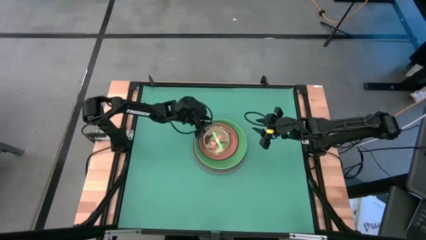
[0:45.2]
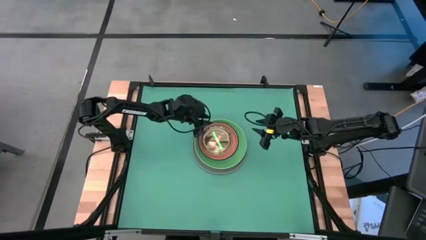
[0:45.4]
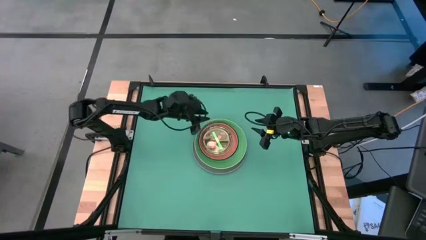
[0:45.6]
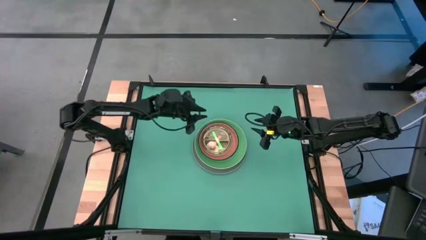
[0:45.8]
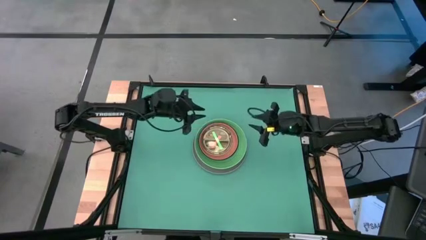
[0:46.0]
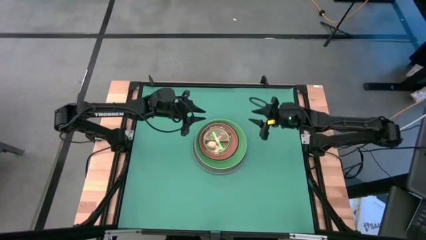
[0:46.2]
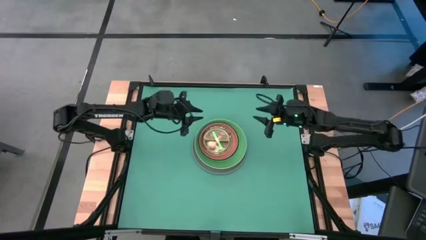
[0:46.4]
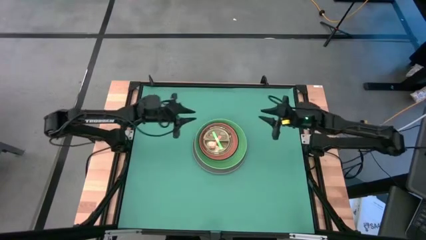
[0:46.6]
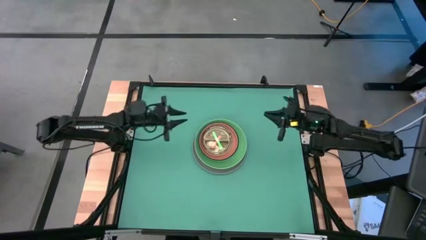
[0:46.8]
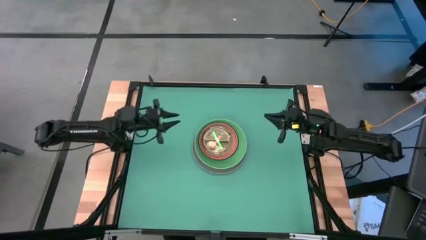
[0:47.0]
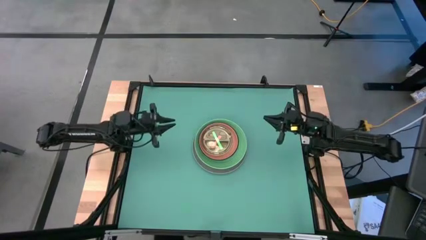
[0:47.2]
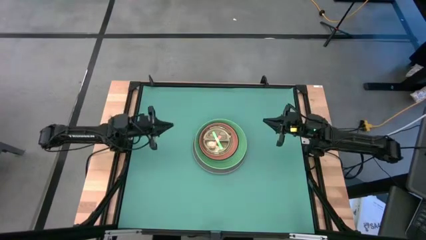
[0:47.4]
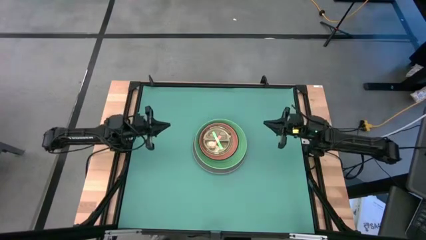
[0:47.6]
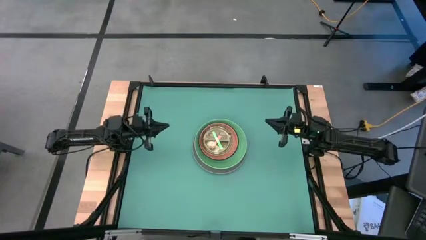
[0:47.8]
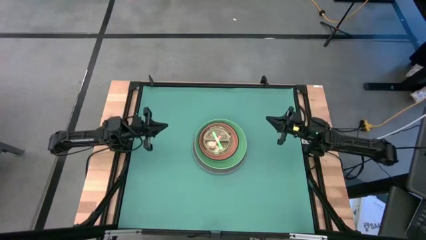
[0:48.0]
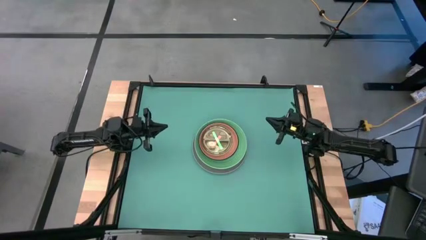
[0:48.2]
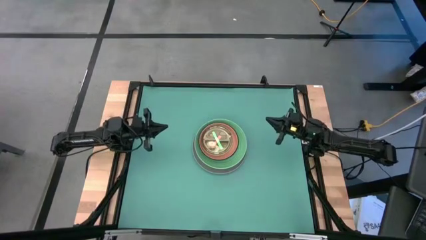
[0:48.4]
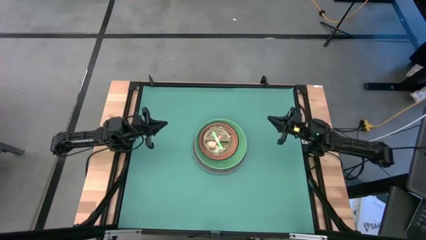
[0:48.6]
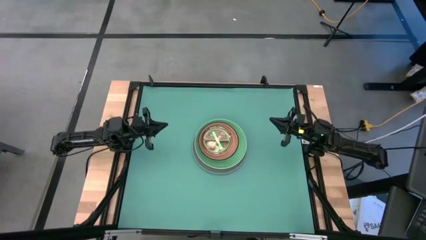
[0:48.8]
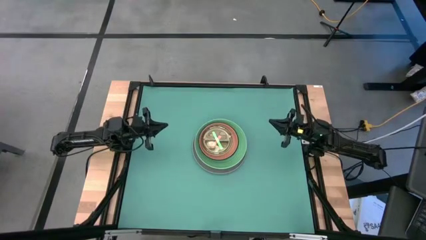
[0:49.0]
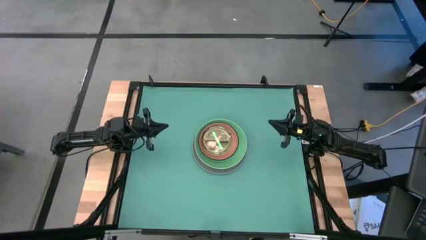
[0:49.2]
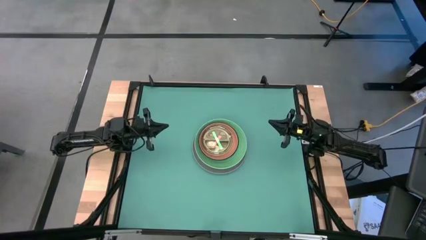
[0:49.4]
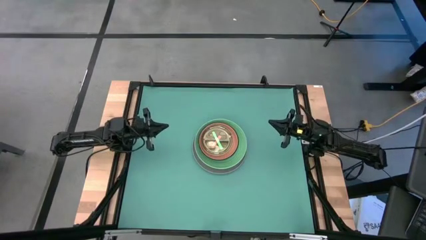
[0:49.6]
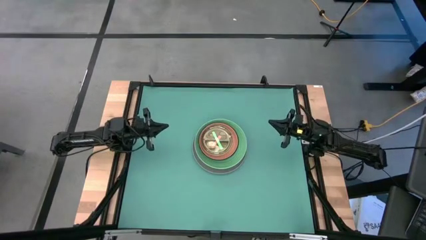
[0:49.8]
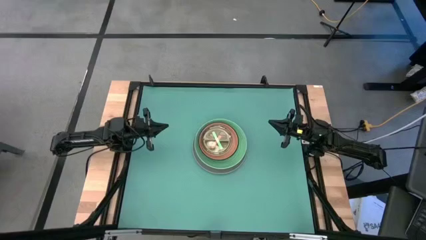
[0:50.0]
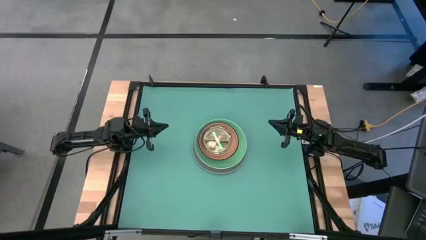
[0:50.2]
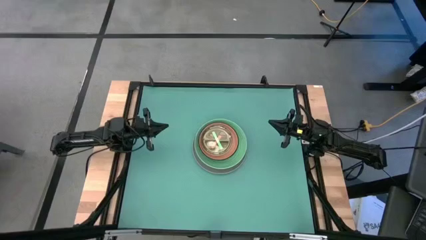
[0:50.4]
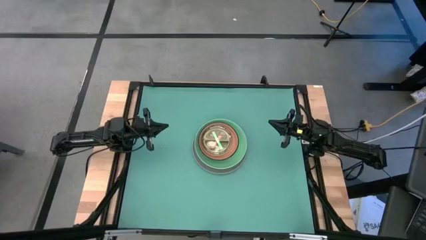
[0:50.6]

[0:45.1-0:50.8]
Task: Stack plastic plates
Return to Home Position

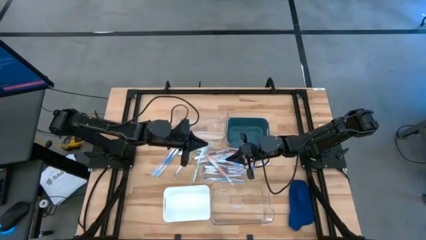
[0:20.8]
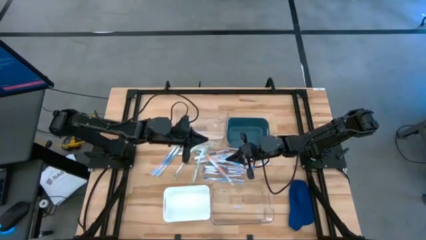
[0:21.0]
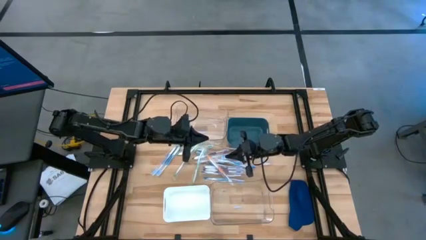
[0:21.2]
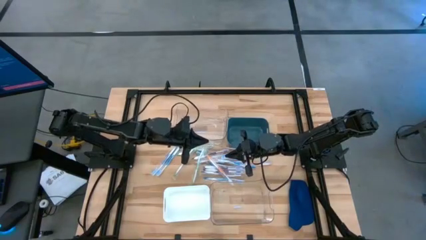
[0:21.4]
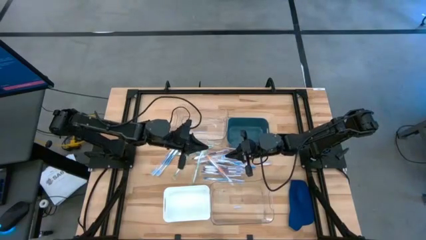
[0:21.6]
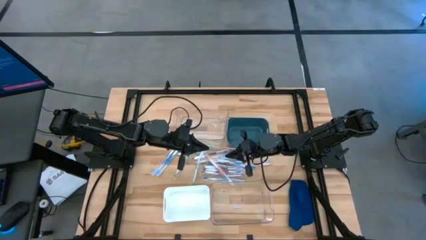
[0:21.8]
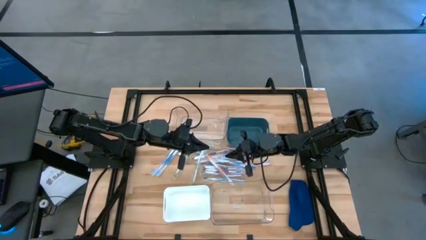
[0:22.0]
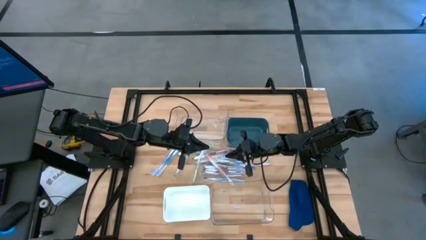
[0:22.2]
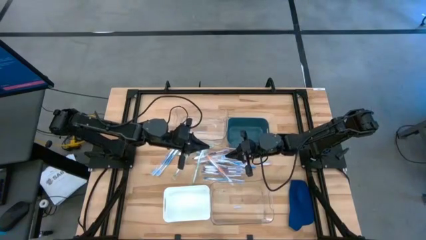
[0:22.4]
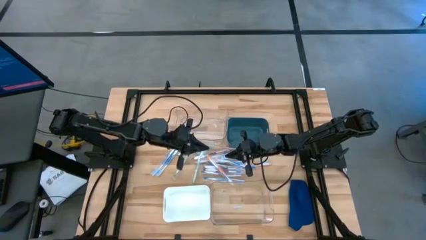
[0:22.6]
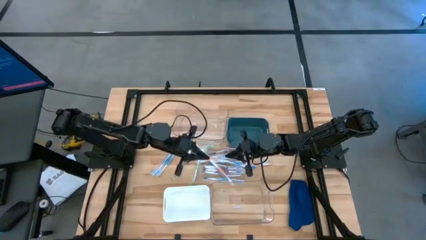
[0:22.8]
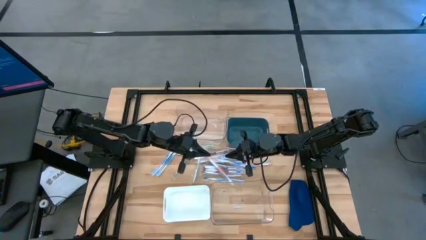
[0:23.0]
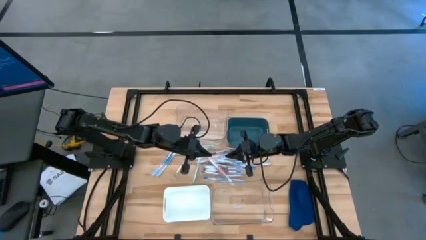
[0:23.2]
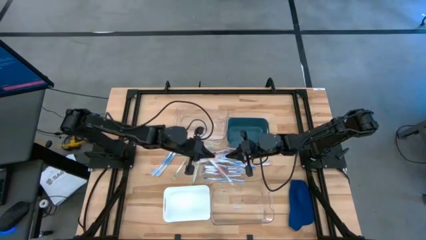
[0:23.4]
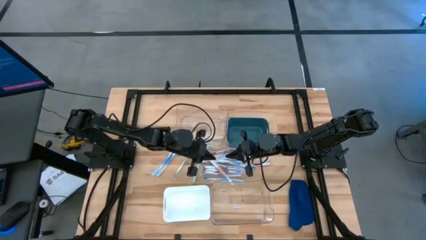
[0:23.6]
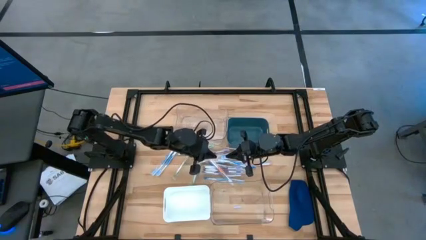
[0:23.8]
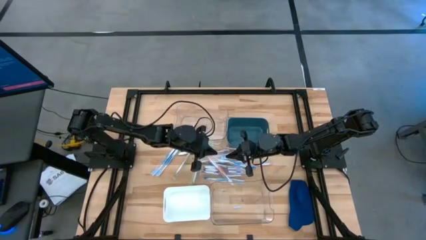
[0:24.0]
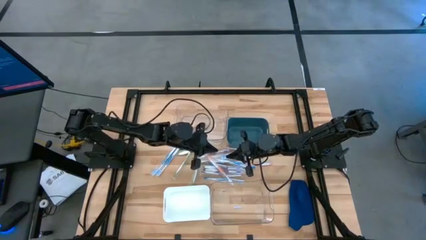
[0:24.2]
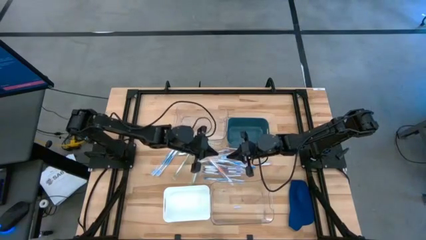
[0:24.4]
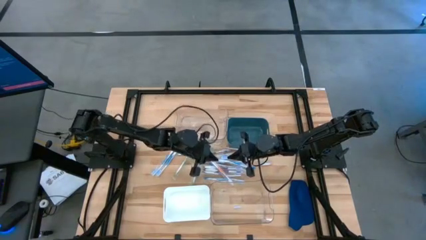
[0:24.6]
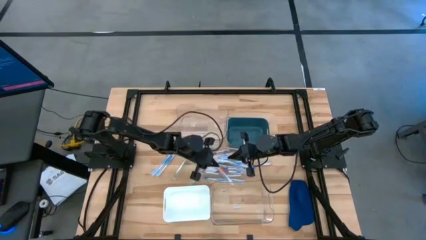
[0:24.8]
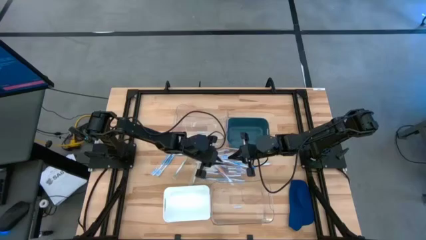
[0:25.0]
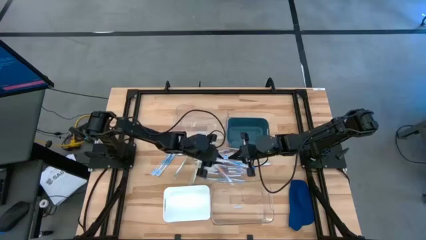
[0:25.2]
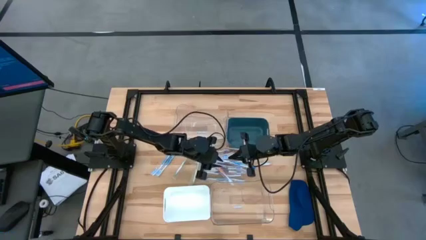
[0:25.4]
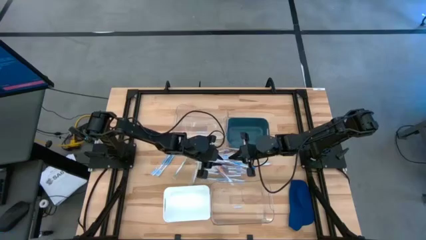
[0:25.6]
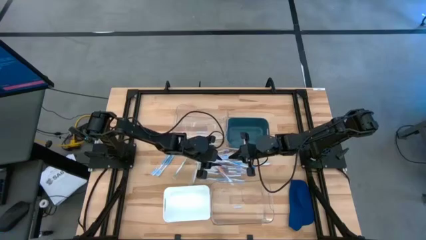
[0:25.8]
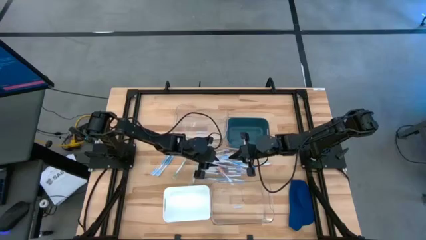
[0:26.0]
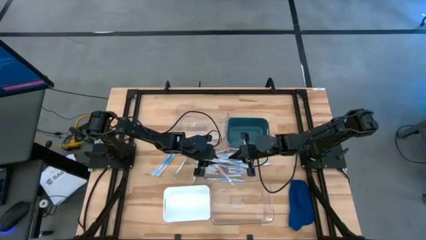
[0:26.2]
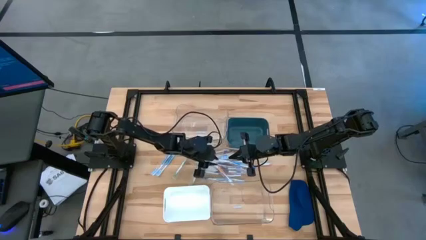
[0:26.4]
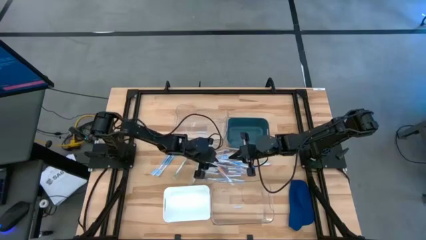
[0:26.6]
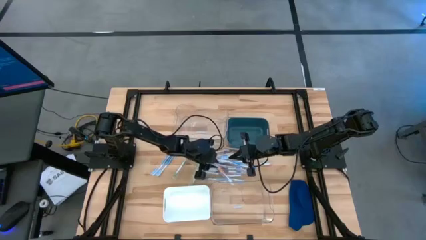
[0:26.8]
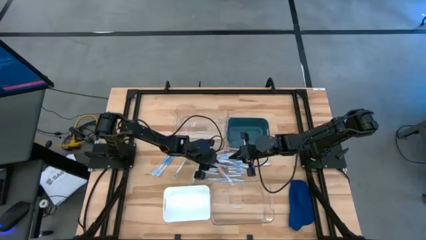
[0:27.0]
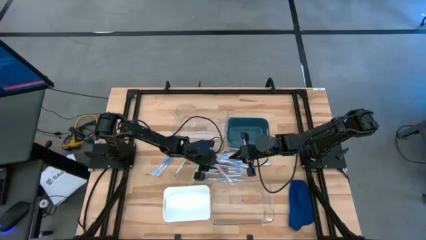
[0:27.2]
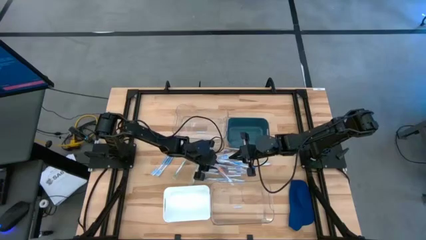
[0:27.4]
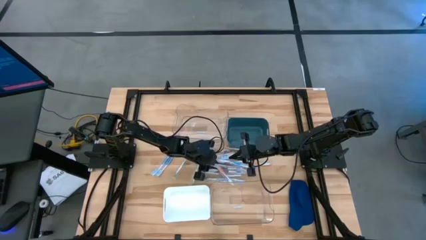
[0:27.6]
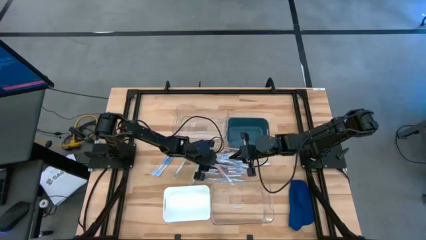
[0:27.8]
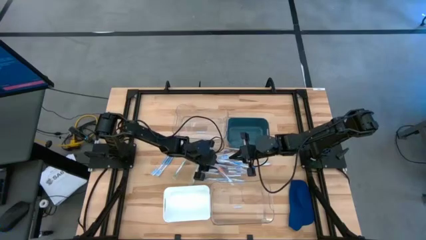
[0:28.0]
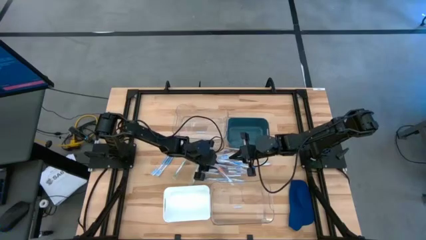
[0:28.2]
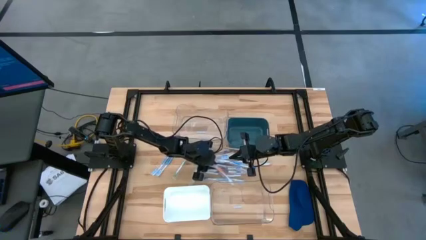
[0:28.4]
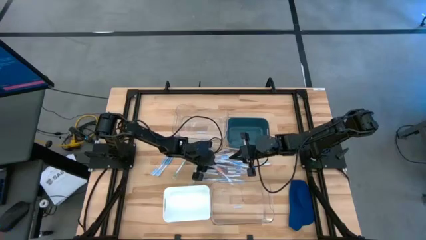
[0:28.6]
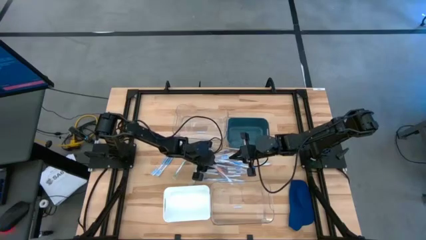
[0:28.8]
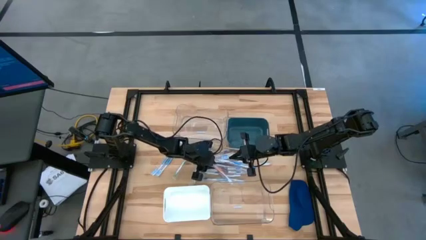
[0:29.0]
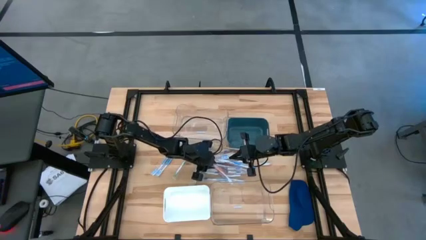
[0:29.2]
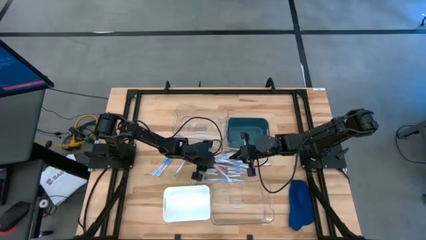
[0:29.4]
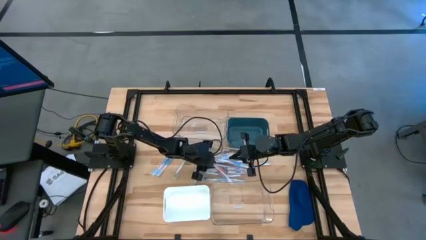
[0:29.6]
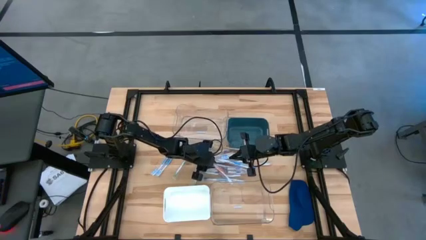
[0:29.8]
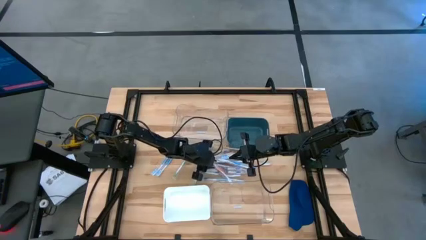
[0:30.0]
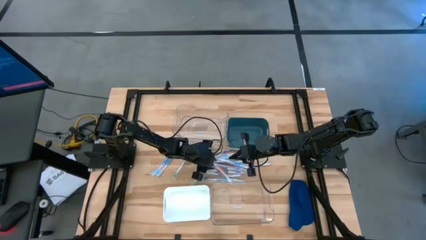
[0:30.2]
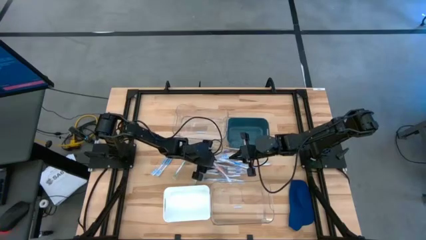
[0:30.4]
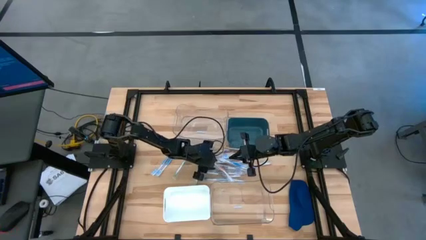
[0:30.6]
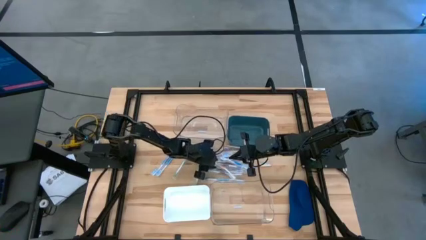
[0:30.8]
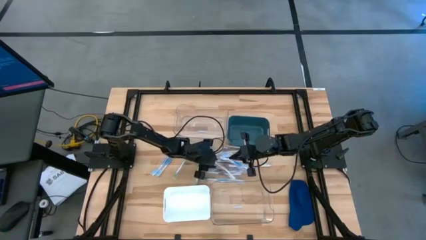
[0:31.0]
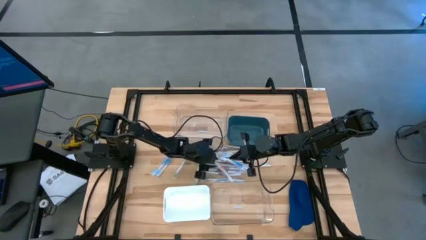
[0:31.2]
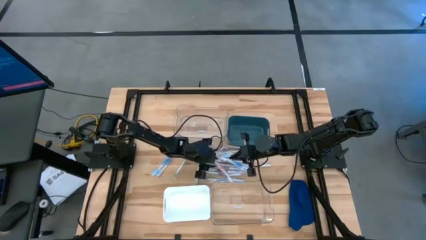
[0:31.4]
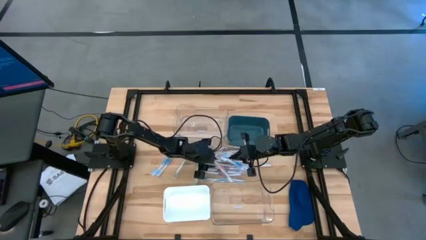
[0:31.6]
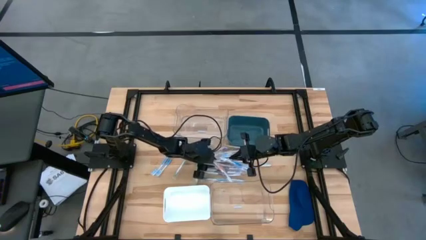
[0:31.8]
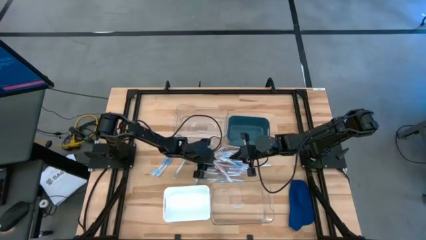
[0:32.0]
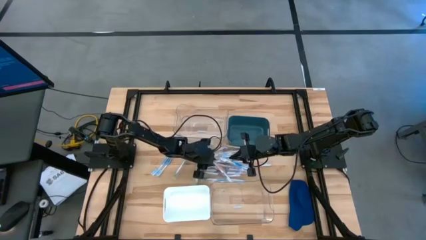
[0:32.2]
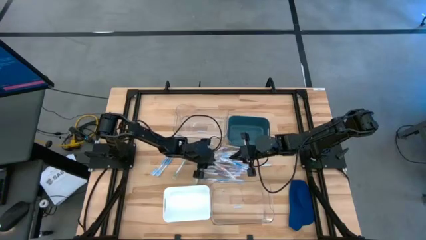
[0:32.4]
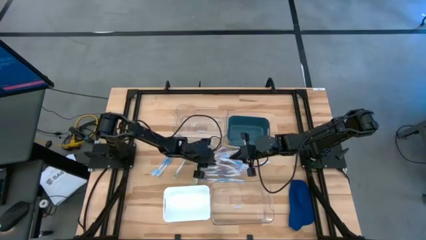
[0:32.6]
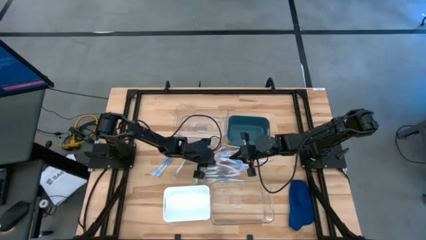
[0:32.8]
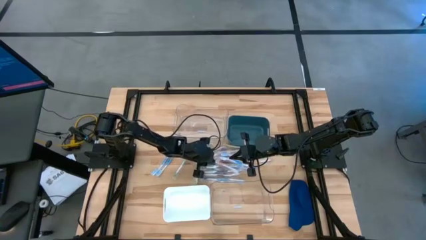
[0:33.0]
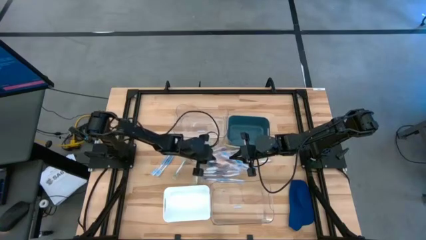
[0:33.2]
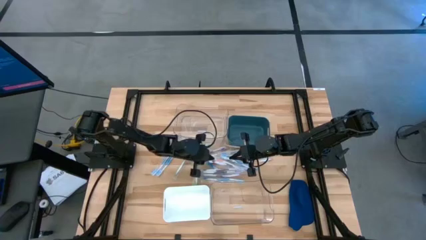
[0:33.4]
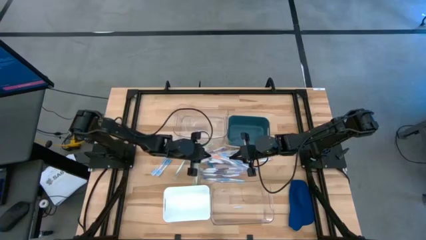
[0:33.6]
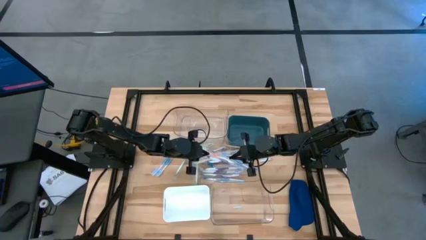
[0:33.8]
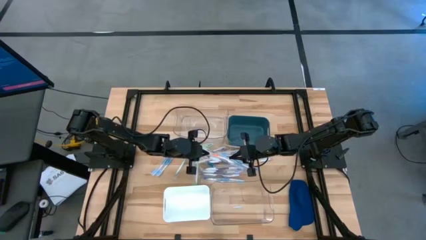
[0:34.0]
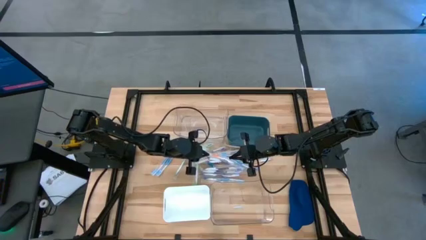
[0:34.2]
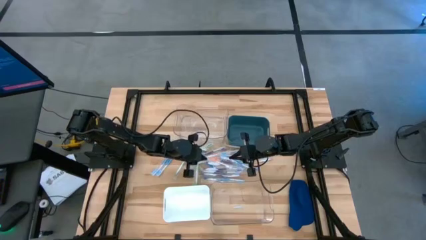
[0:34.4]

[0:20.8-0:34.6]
Task: Pick & Place Toothbrushes
Put the orange toothbrush into the white bin
